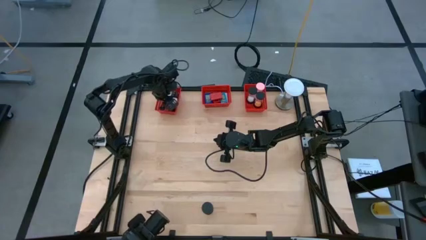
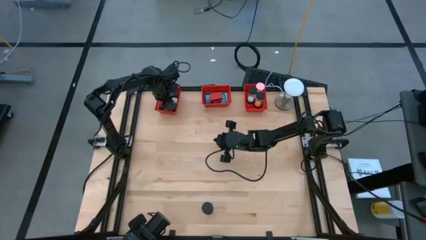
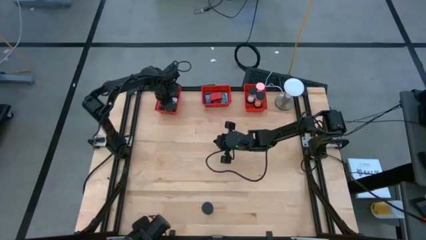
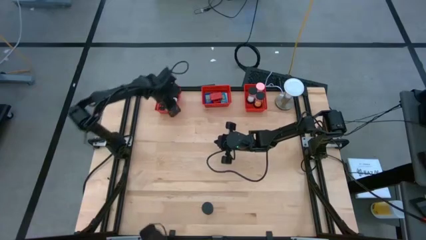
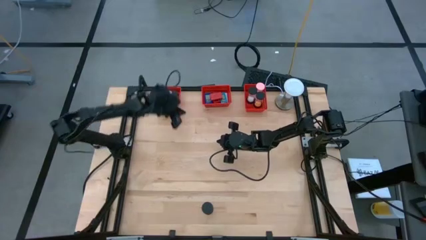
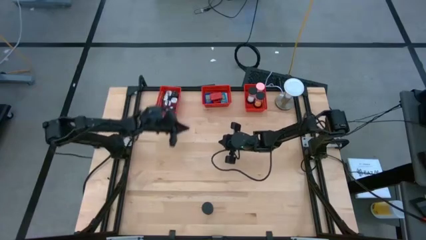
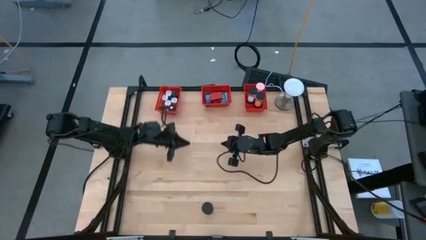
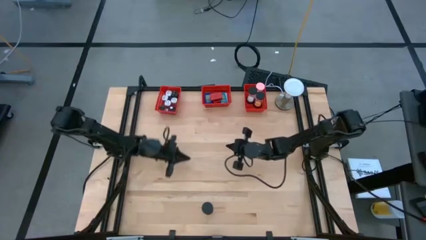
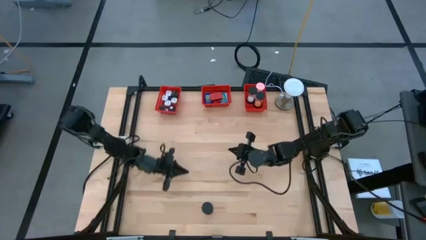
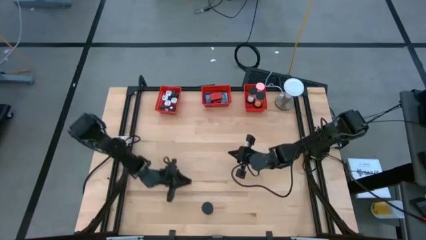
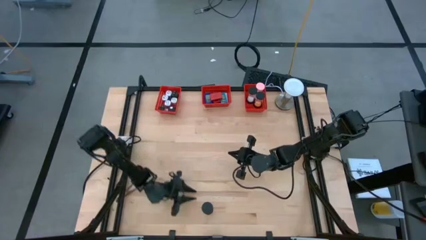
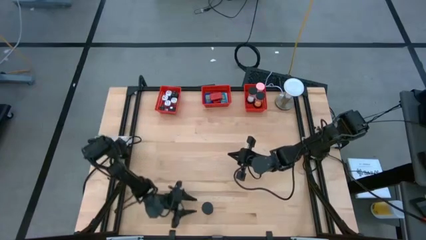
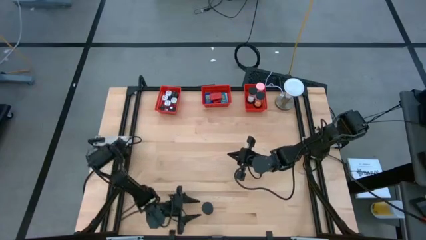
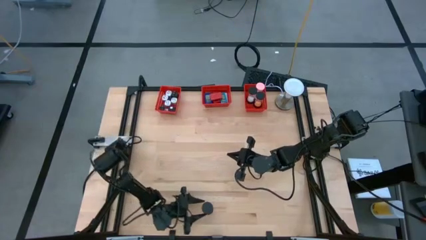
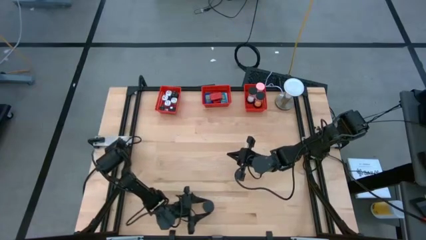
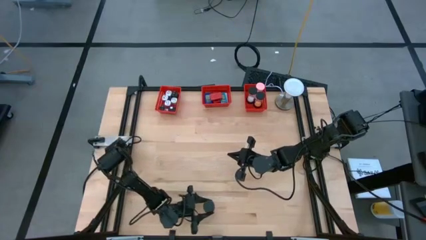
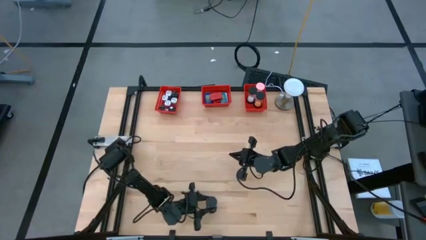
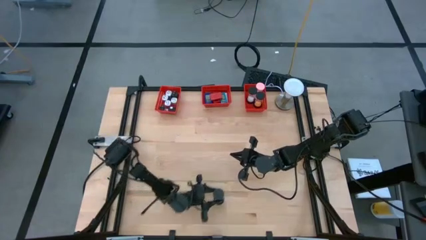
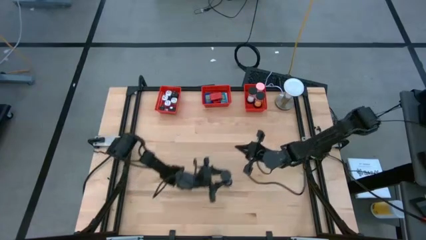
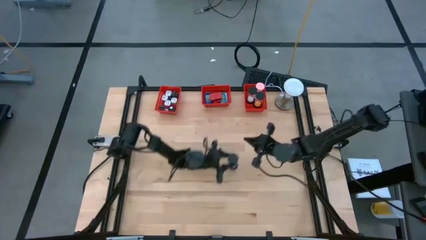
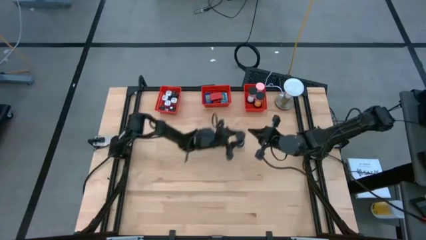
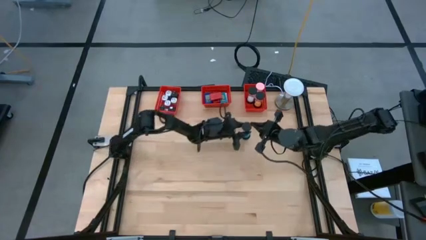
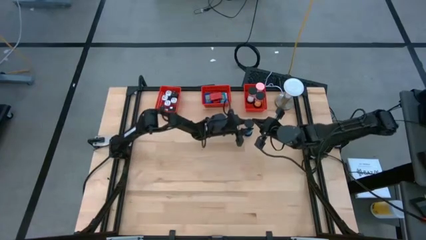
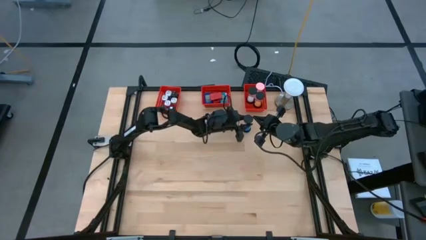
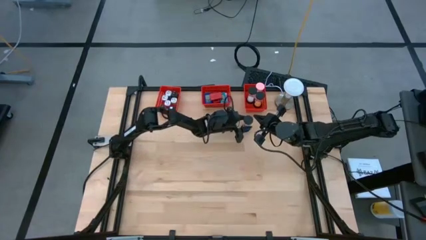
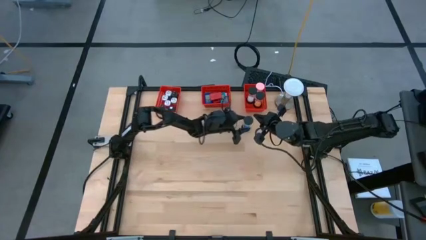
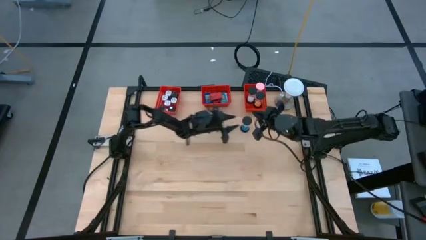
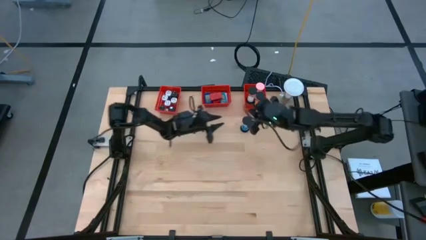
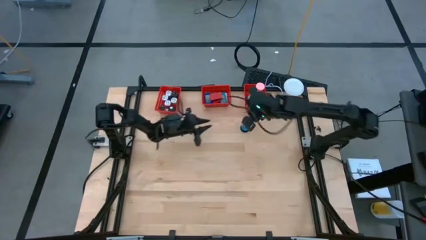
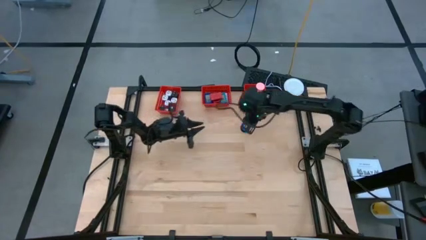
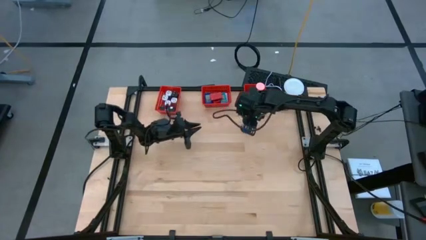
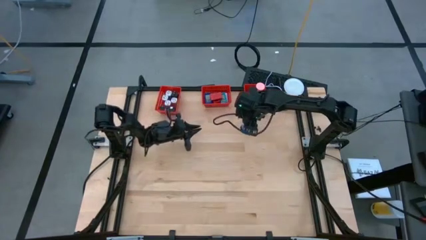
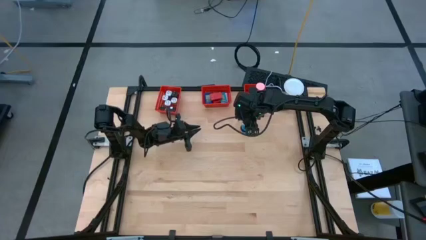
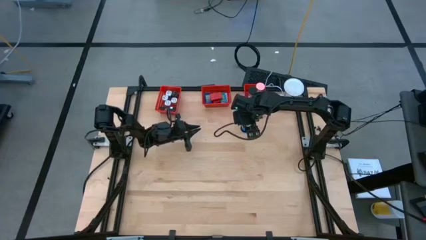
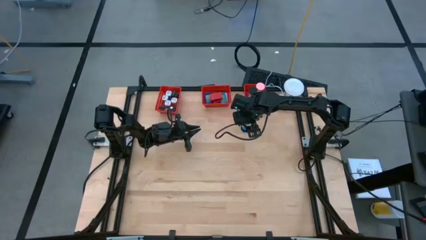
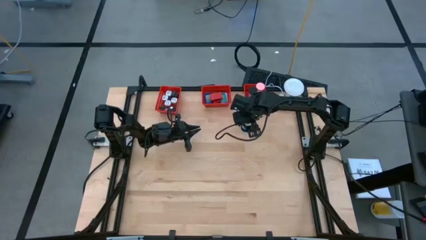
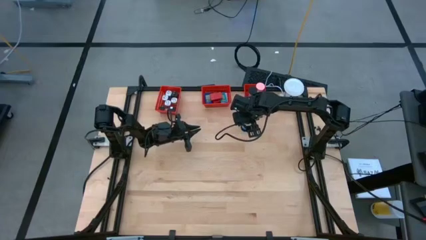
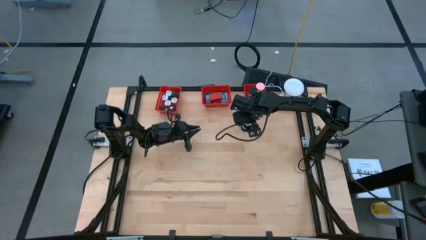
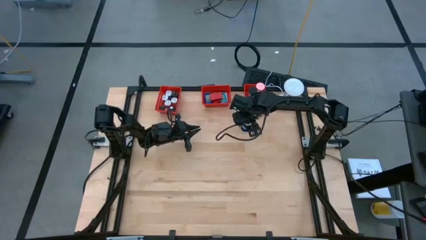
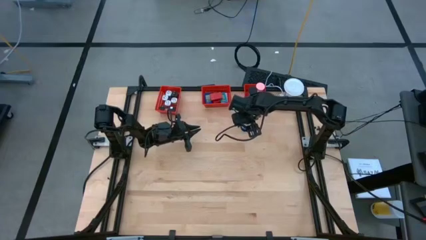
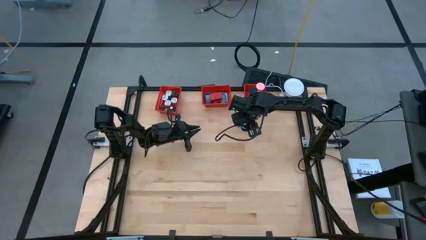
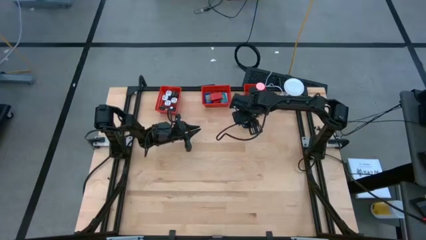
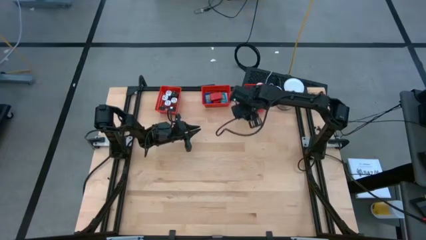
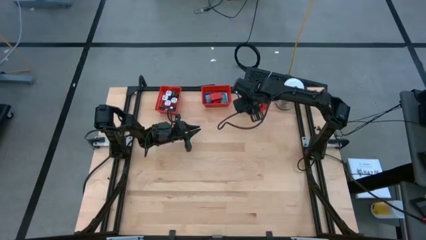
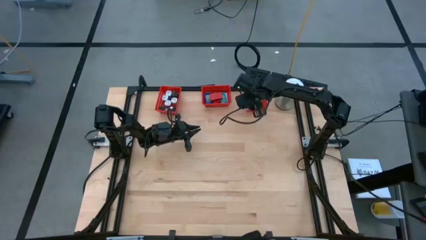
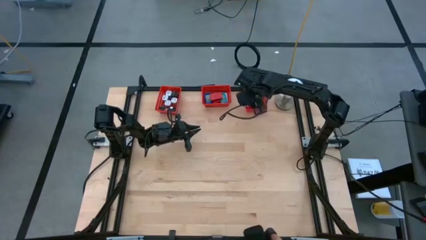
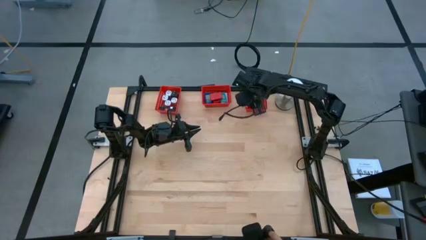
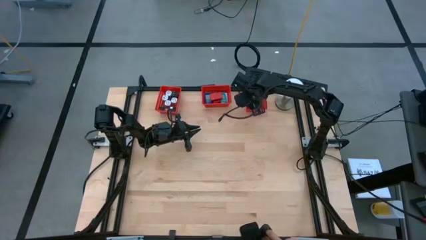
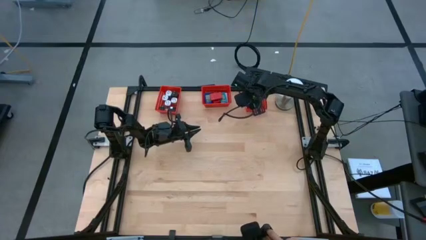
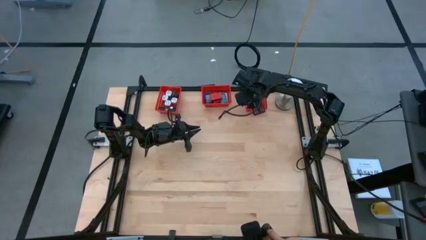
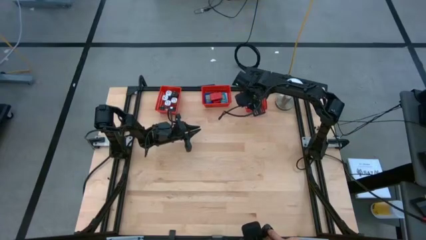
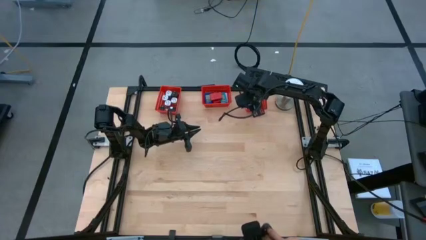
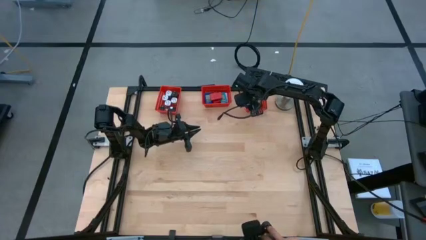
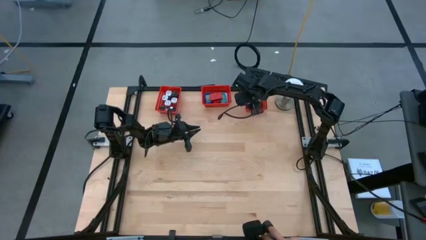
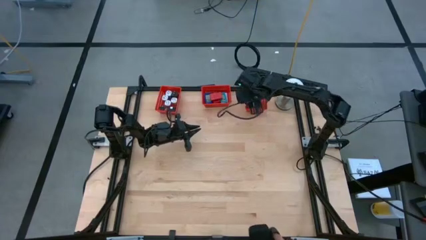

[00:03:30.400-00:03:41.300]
Task: Pick & Place Office items
Put the blue hour glass into the right red bin

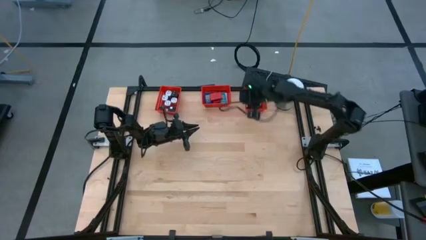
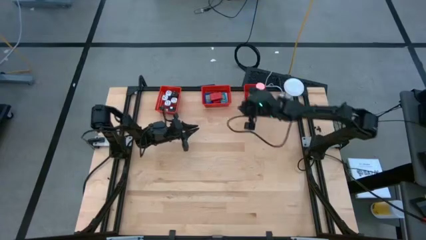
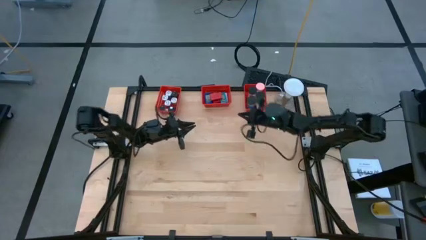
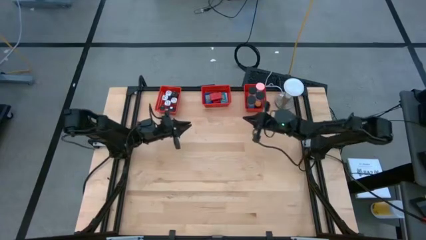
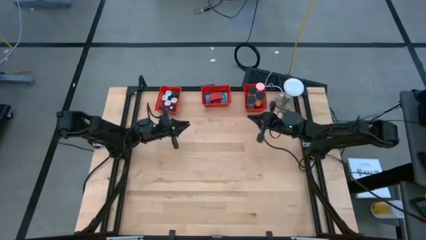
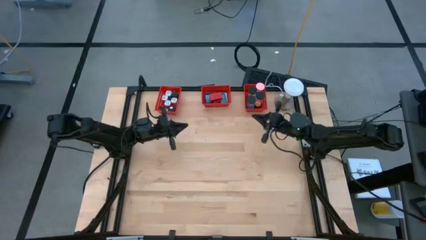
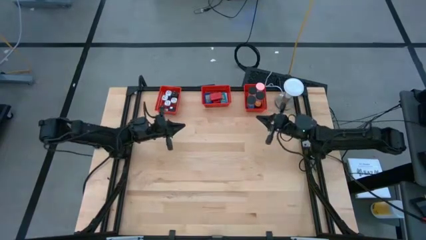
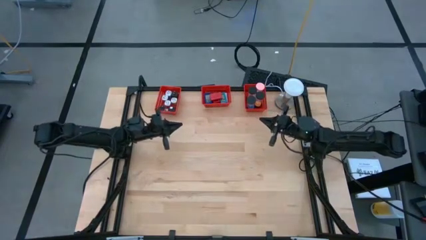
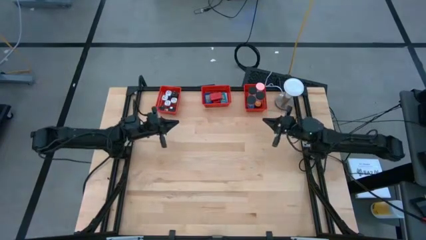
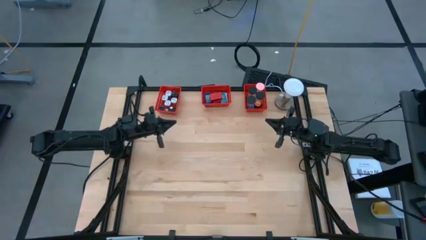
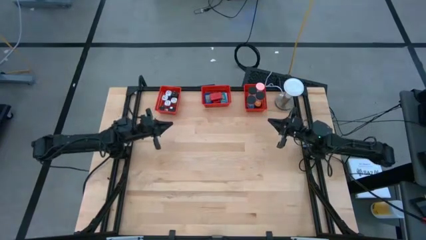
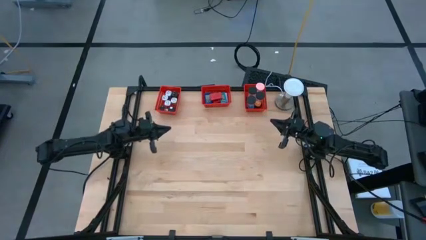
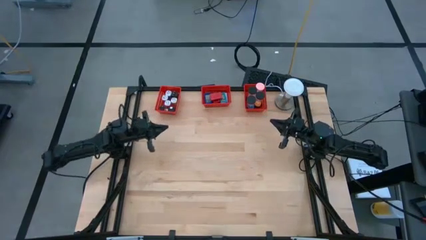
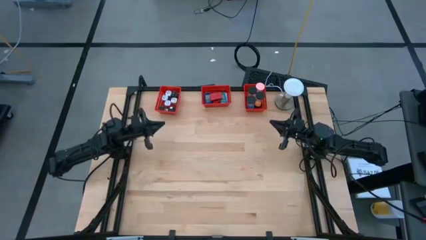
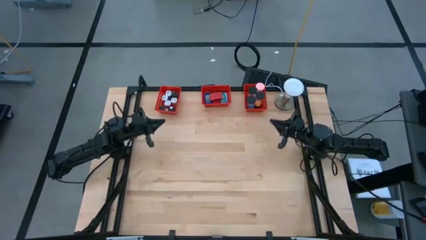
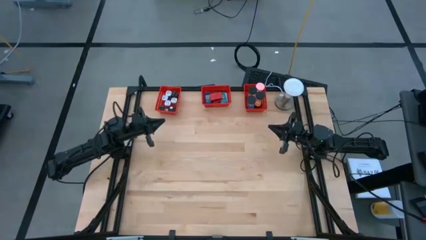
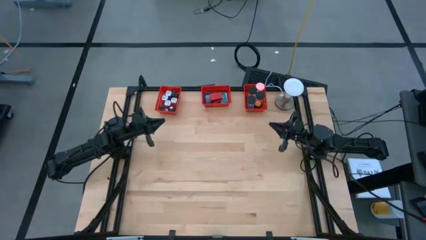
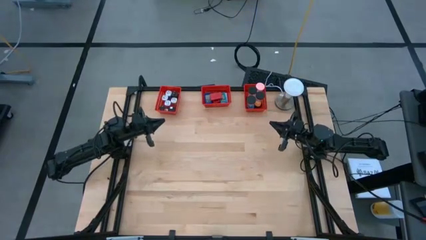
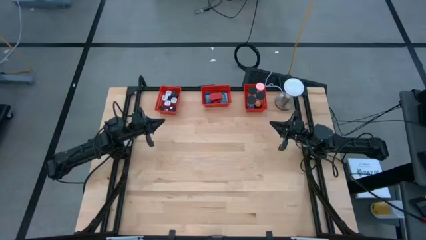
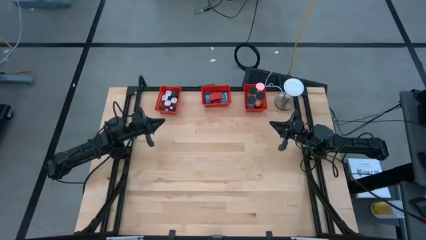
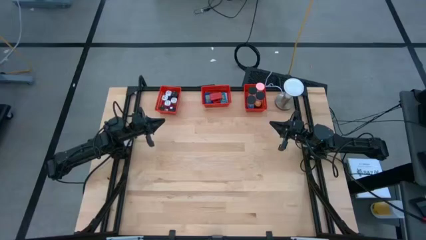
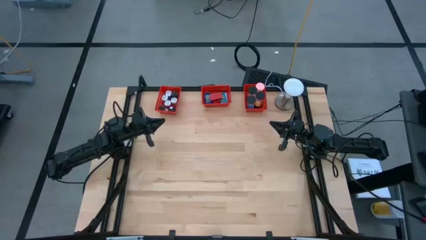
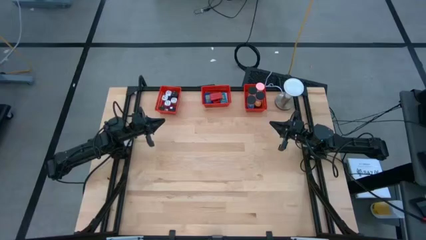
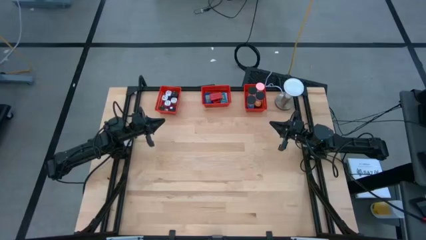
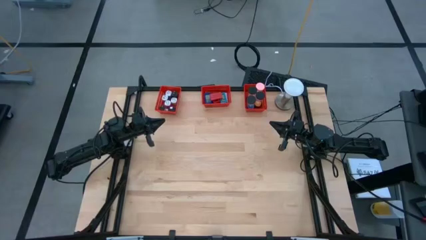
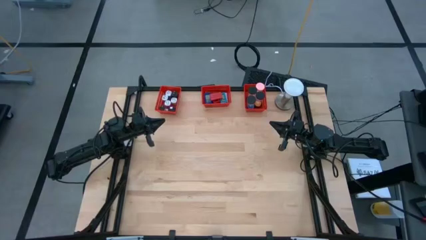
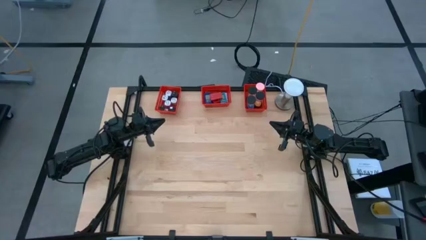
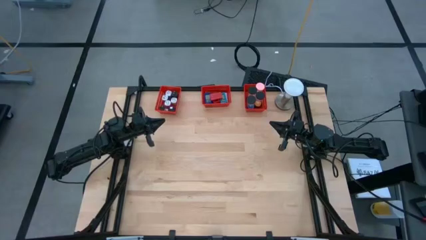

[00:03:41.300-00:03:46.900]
Return to Home Position
